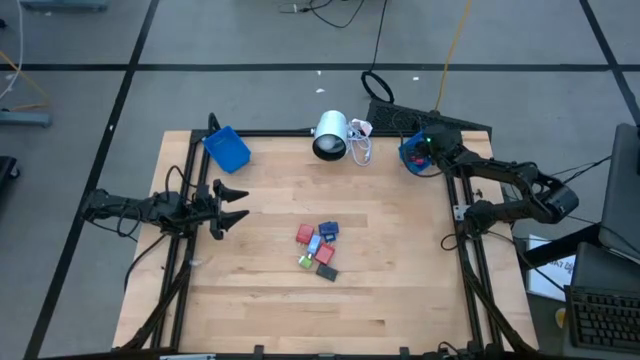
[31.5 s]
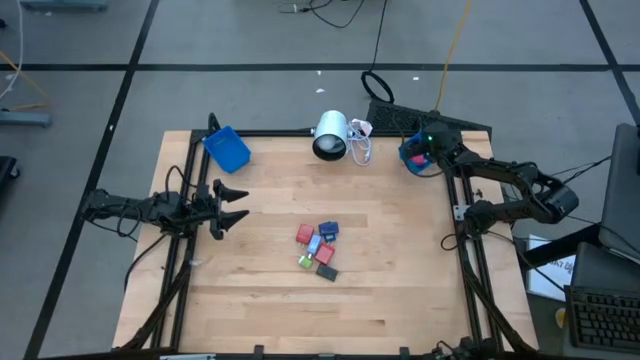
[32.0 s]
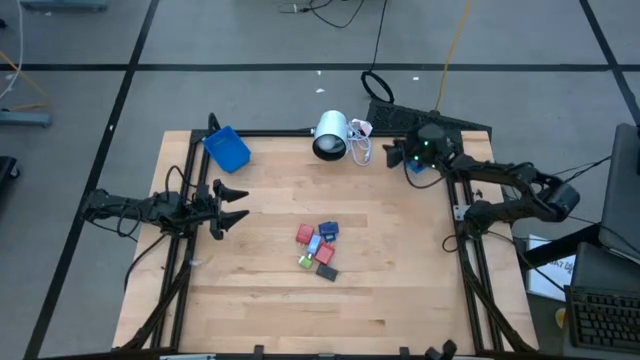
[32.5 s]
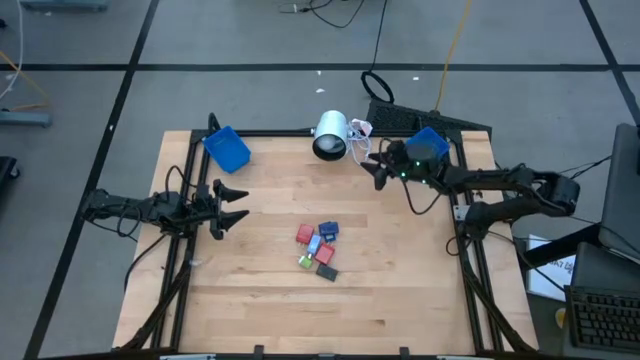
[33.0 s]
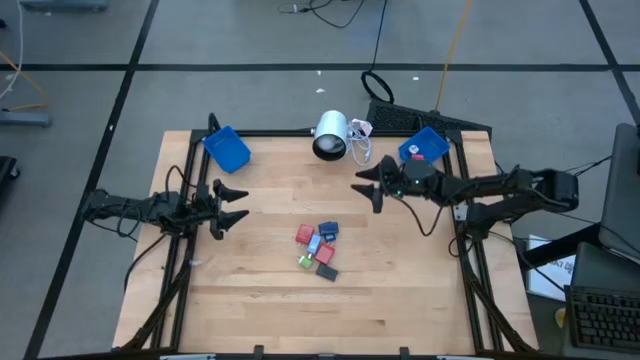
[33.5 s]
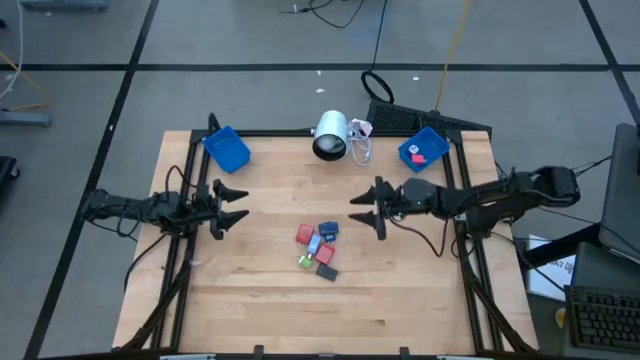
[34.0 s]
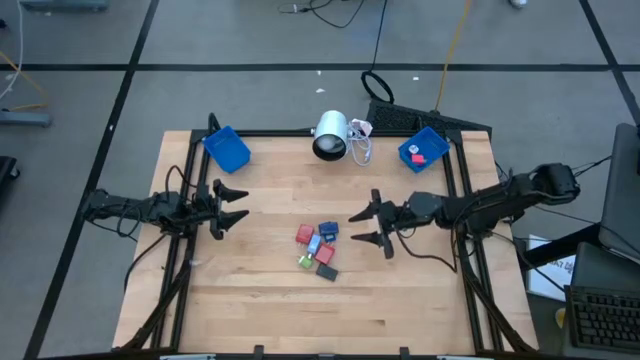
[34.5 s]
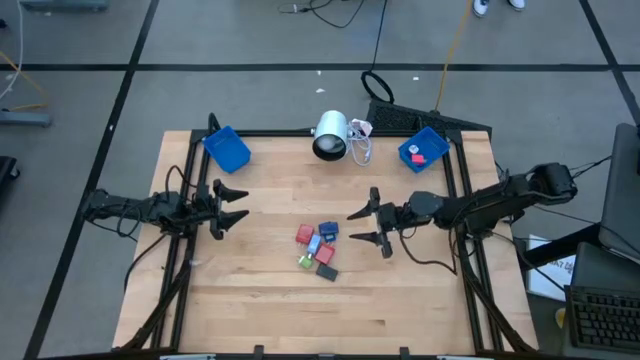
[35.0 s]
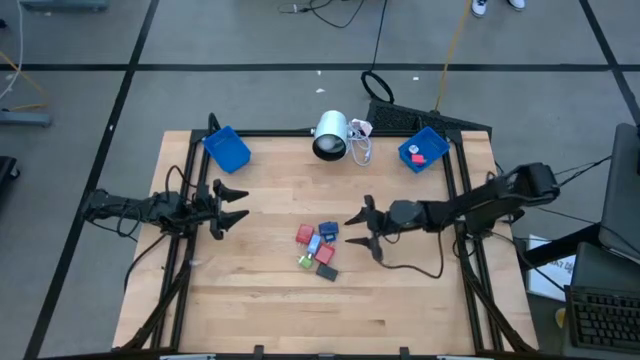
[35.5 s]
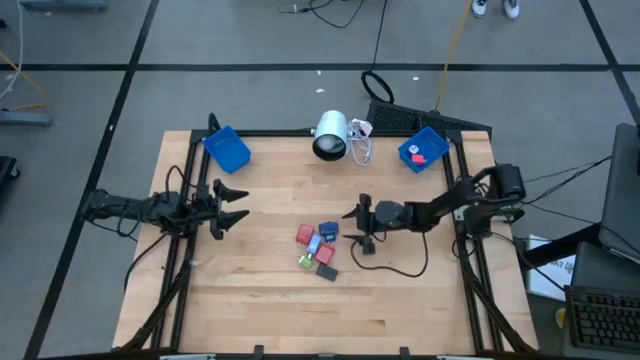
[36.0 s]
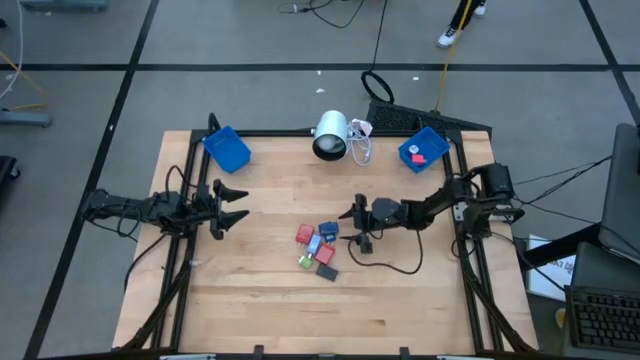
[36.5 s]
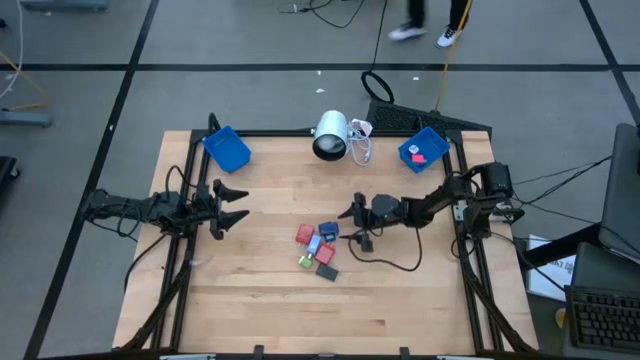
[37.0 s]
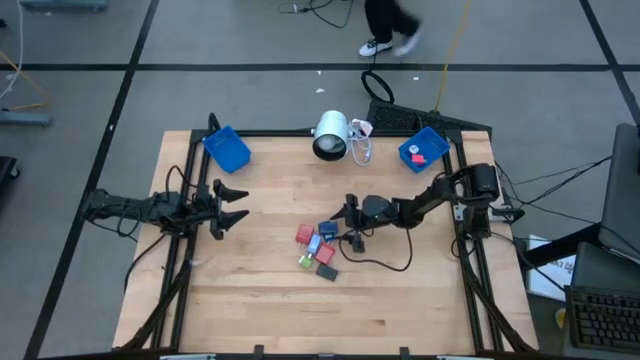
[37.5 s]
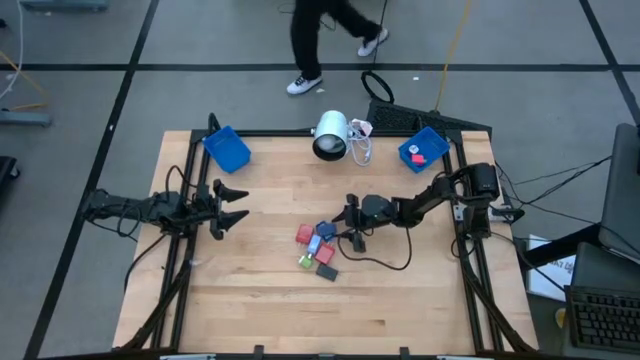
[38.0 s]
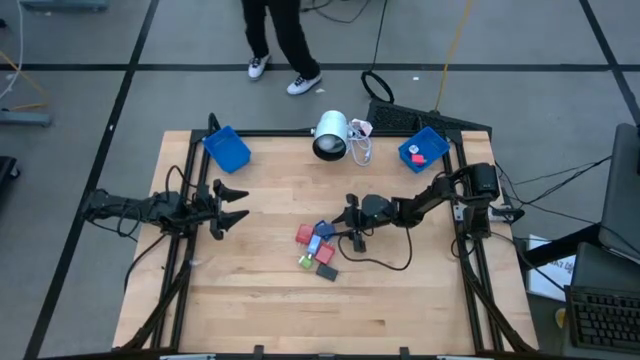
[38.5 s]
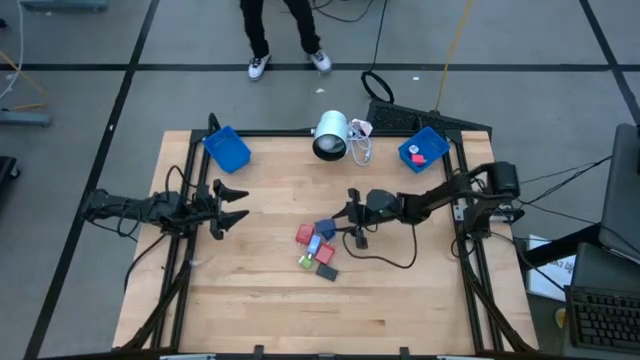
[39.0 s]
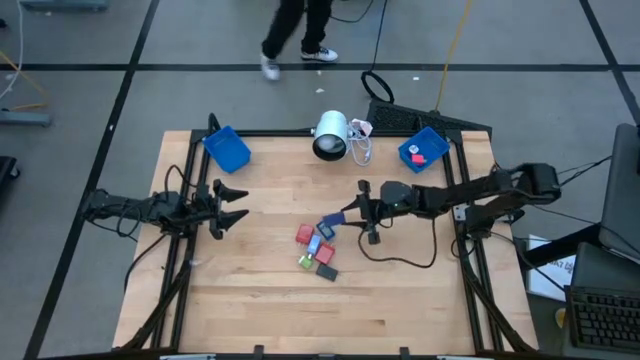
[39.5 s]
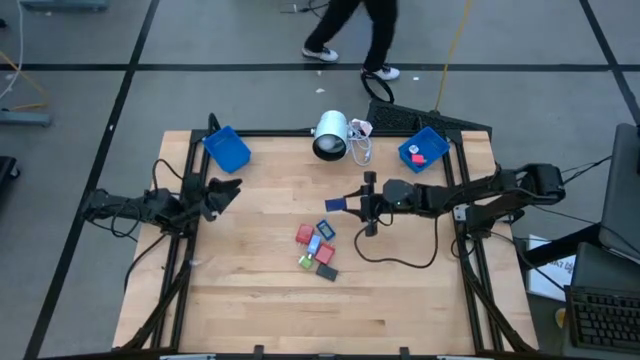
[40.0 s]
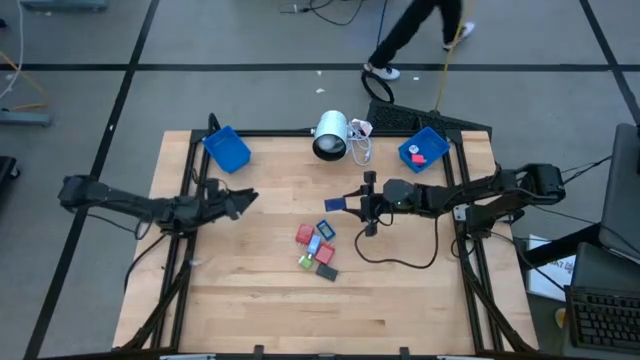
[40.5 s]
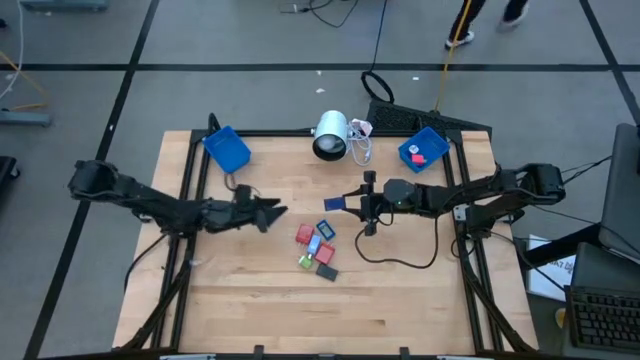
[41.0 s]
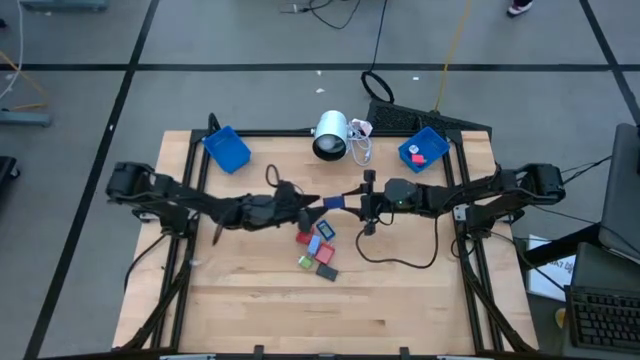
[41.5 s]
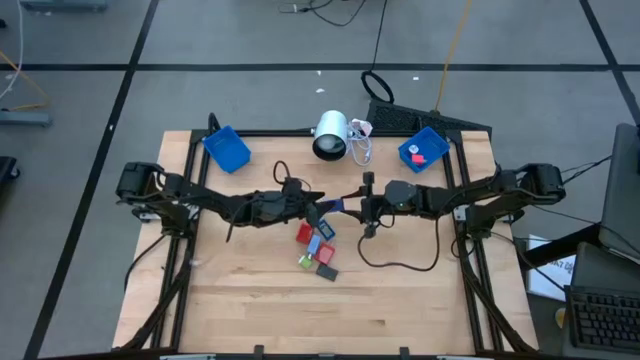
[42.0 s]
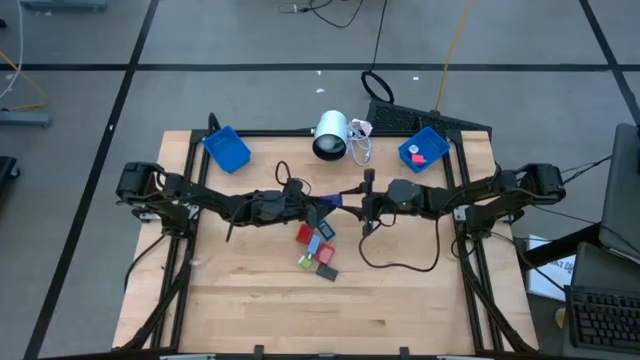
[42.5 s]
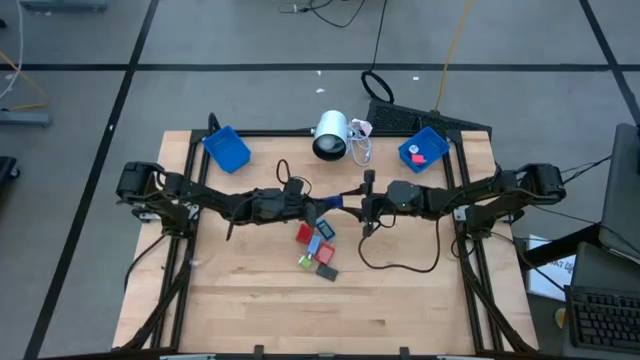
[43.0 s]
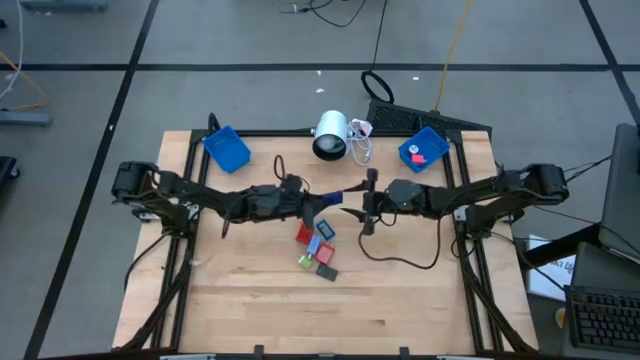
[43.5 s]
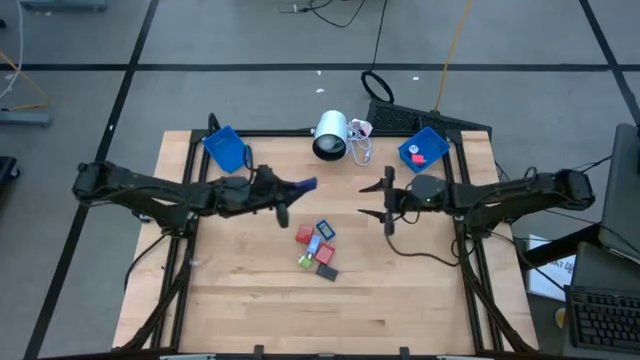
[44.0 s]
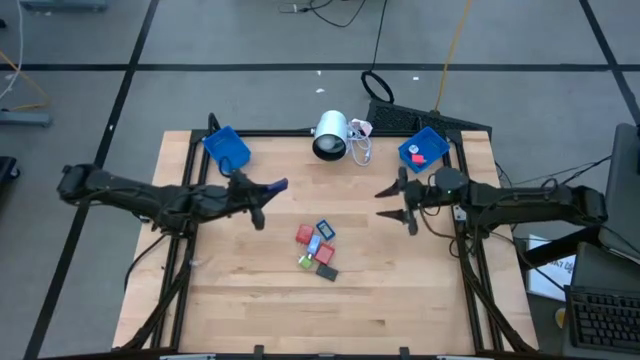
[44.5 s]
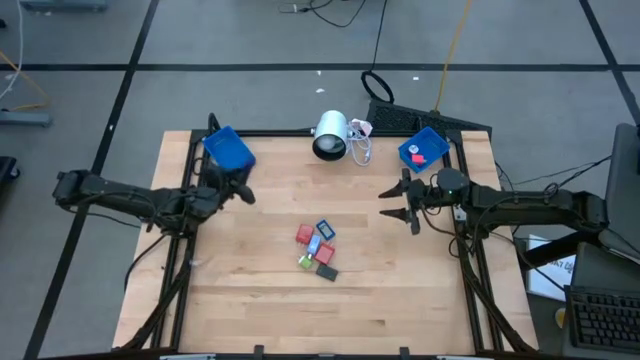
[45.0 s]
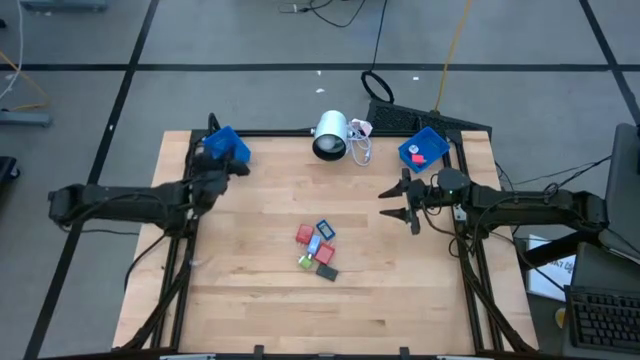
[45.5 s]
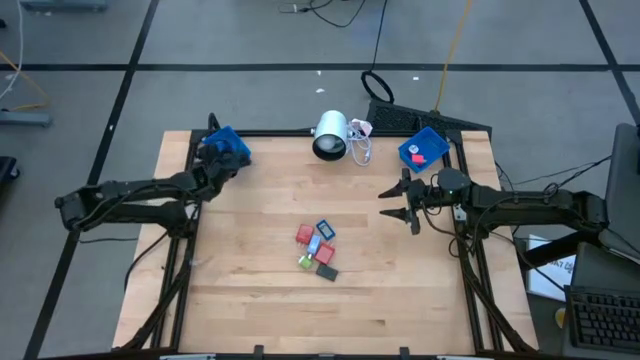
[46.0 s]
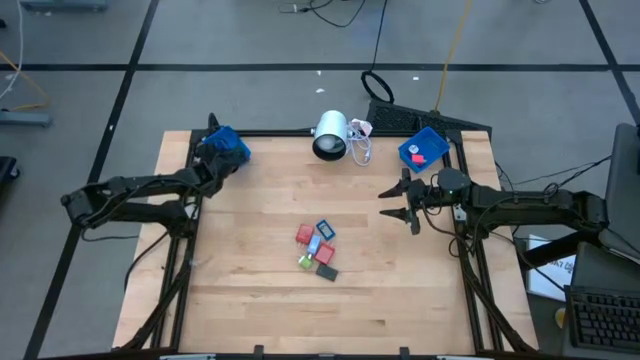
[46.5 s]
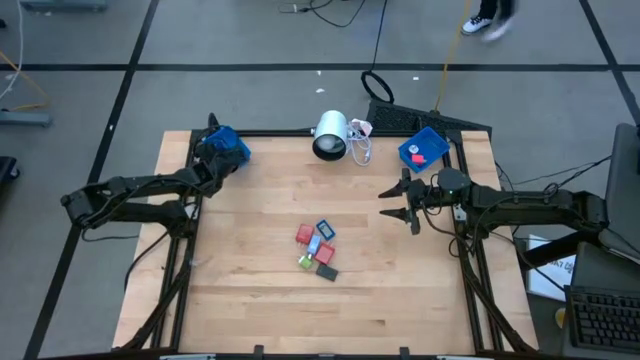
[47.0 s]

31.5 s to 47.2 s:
Task: Pick & Place Office items
Put the dark blue digital timer into the left blue bin

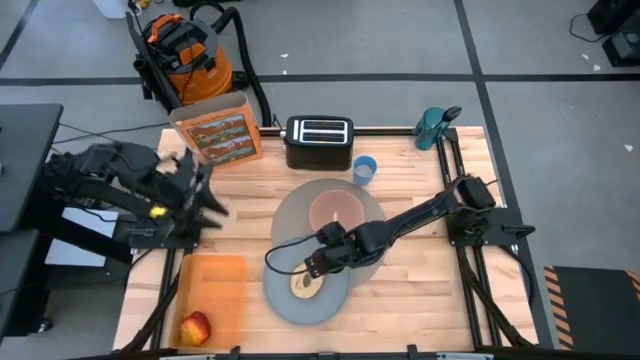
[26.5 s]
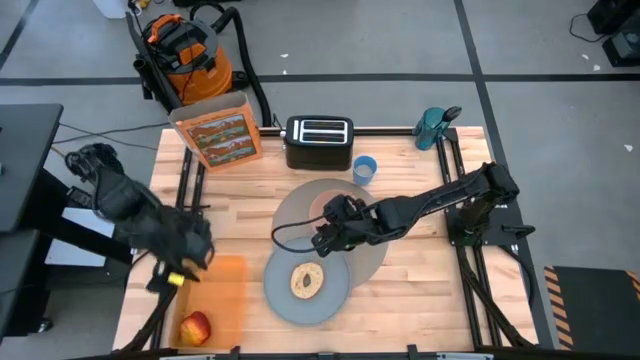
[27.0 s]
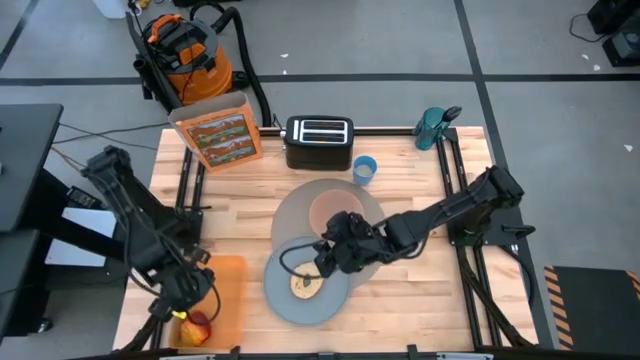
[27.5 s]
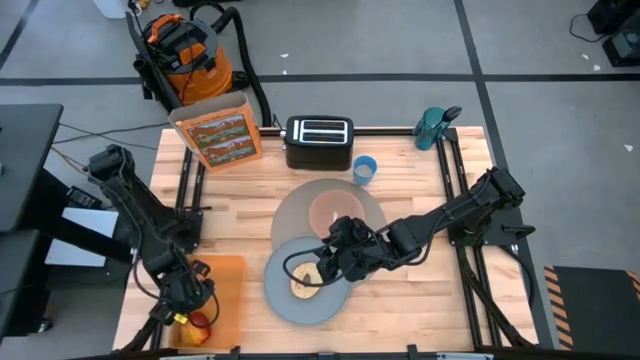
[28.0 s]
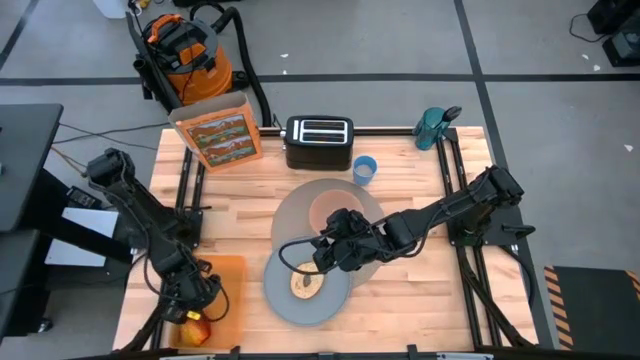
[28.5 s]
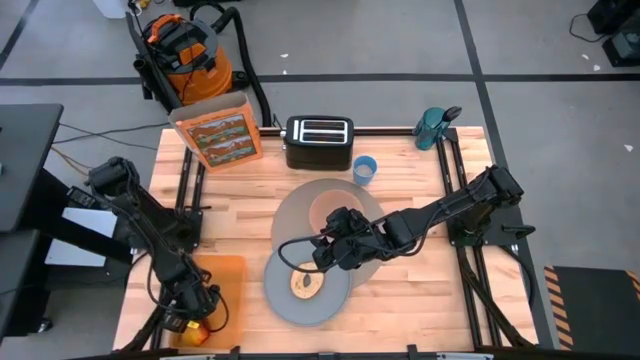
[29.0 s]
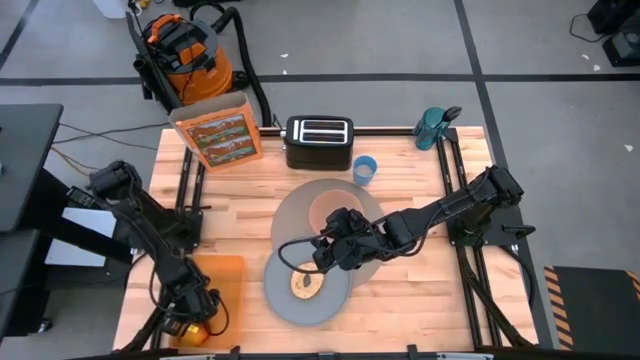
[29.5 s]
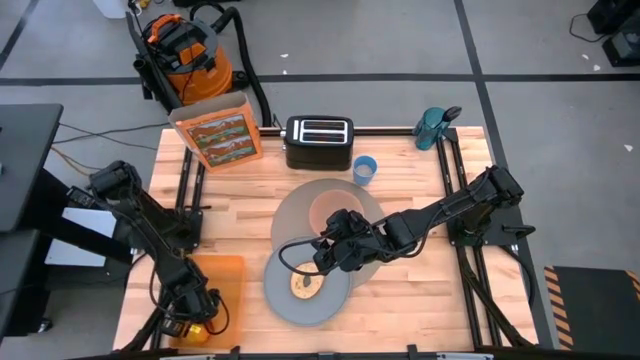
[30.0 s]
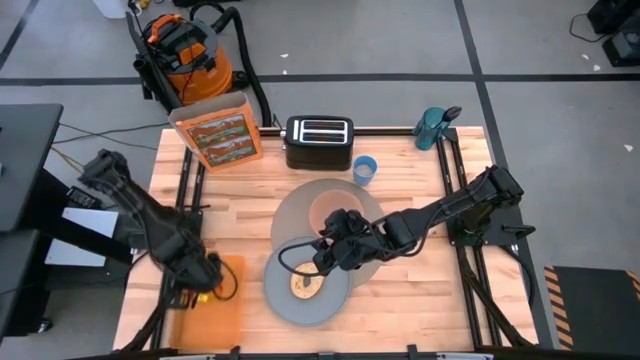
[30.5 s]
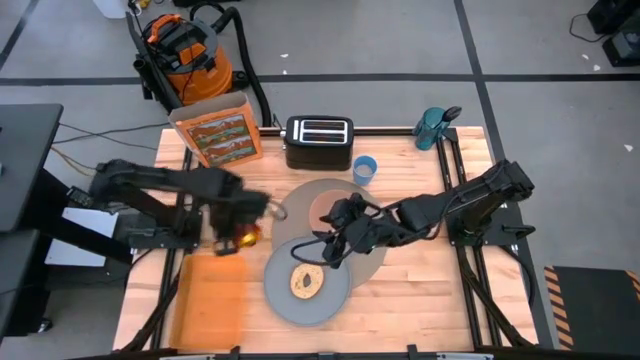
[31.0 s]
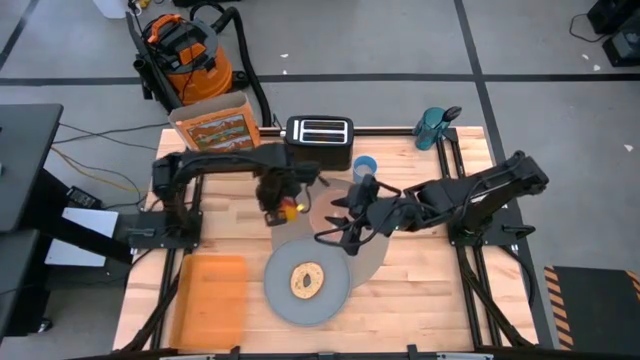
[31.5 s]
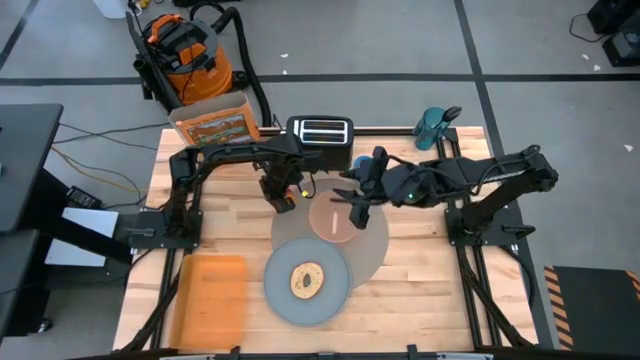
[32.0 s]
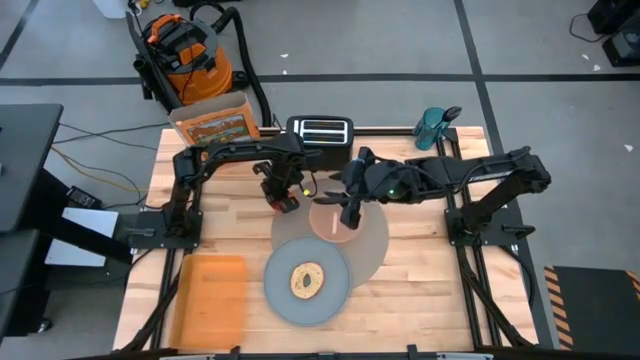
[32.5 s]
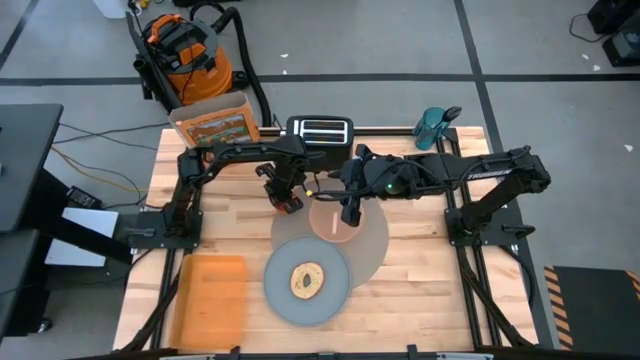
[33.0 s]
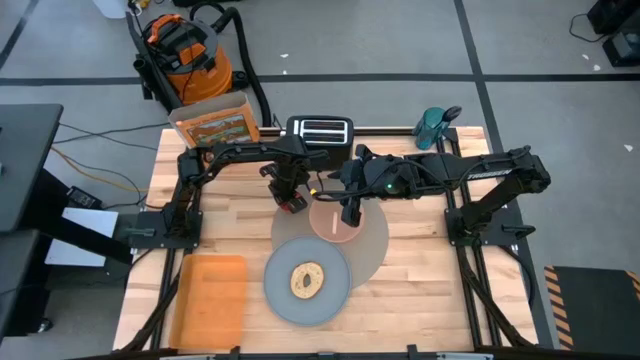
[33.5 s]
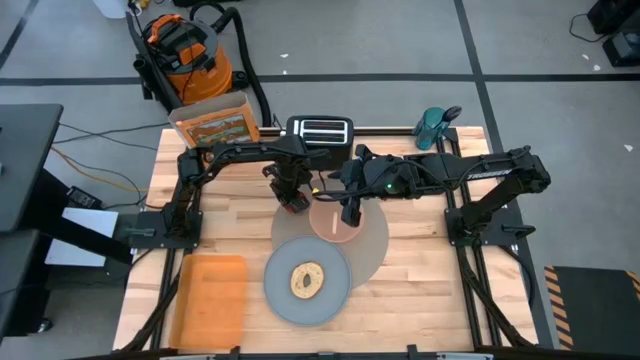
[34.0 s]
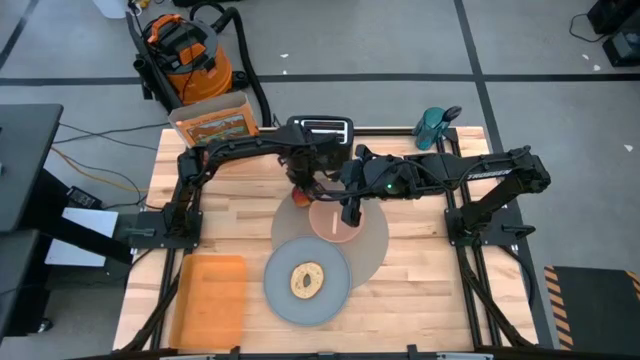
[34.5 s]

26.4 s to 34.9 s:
Task: Arrange a breakfast setting
Put the red apple on the left side of the light orange bowl on the gray placemat
